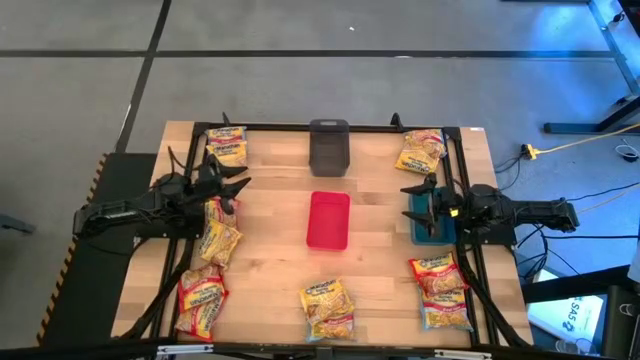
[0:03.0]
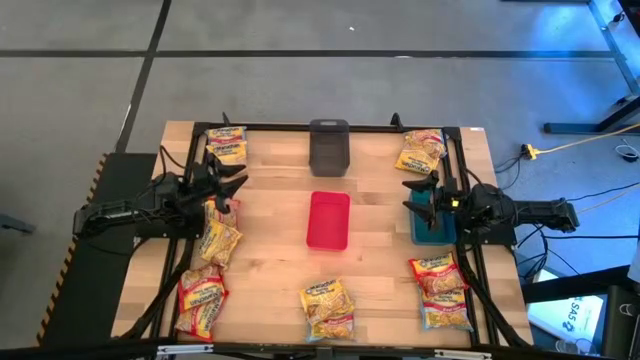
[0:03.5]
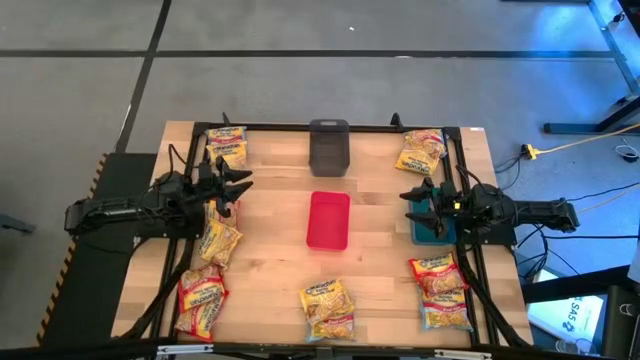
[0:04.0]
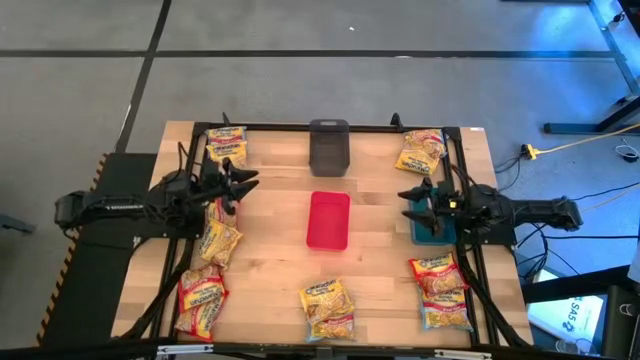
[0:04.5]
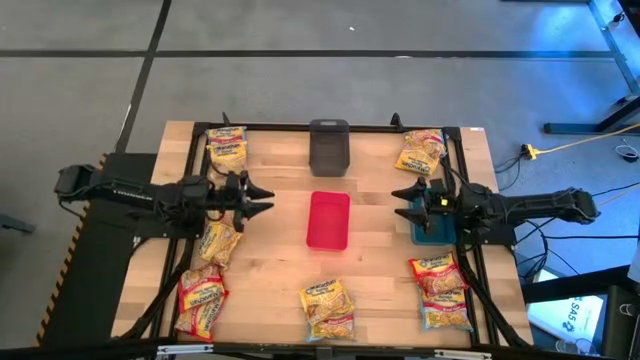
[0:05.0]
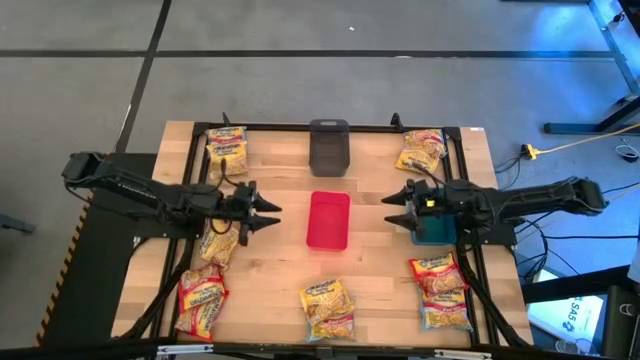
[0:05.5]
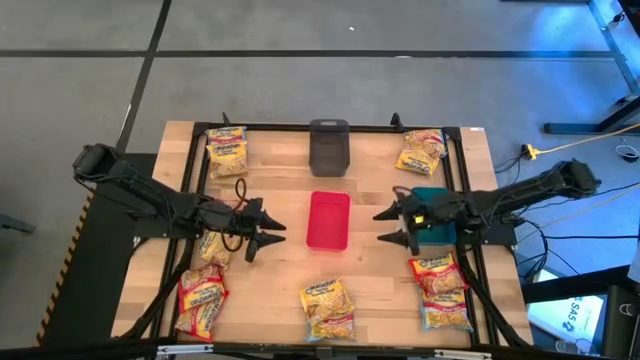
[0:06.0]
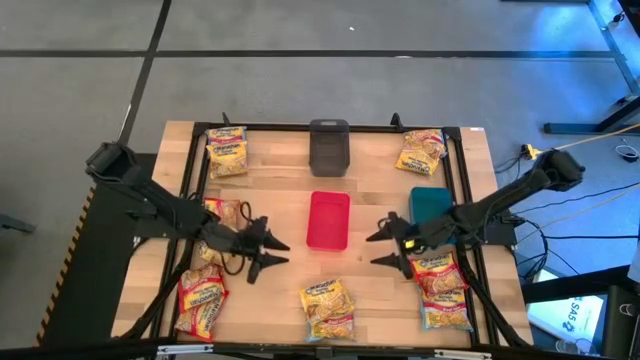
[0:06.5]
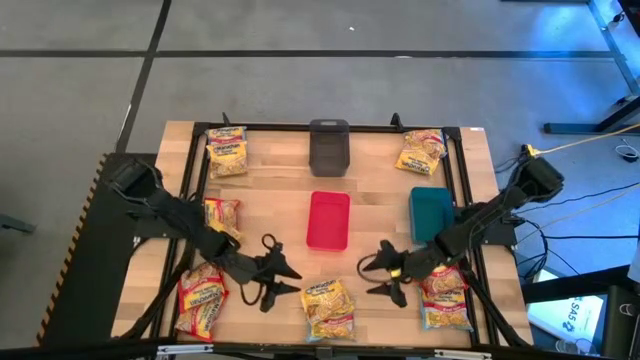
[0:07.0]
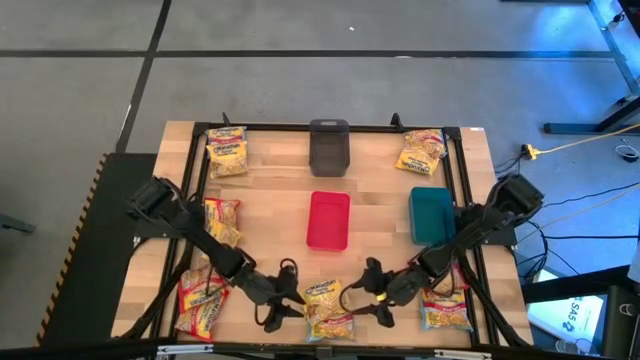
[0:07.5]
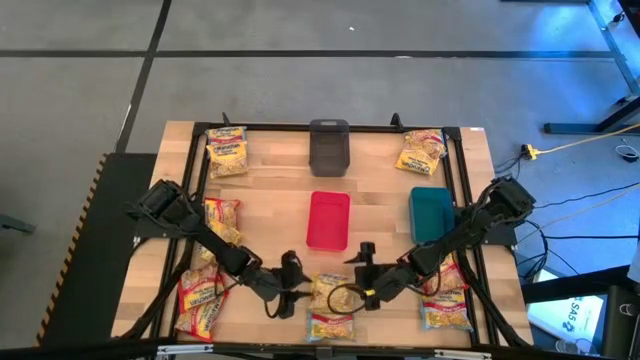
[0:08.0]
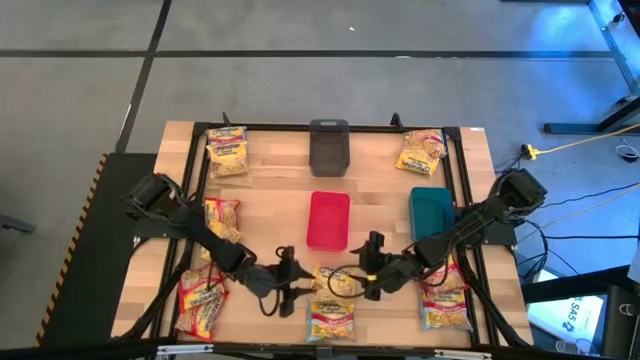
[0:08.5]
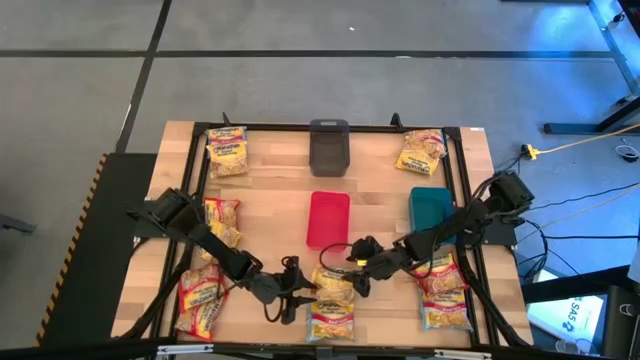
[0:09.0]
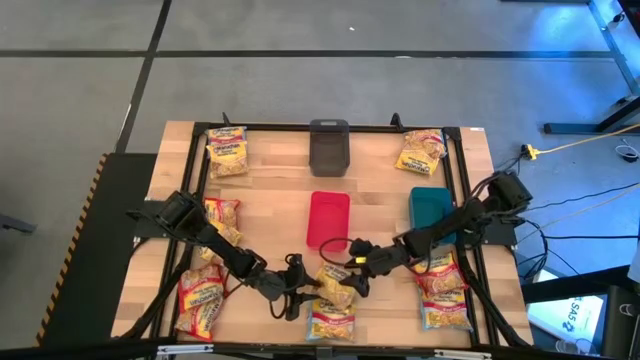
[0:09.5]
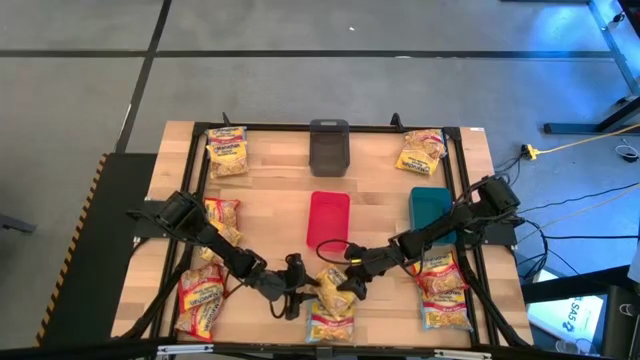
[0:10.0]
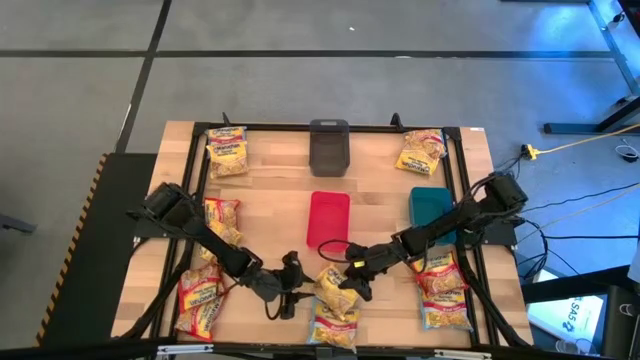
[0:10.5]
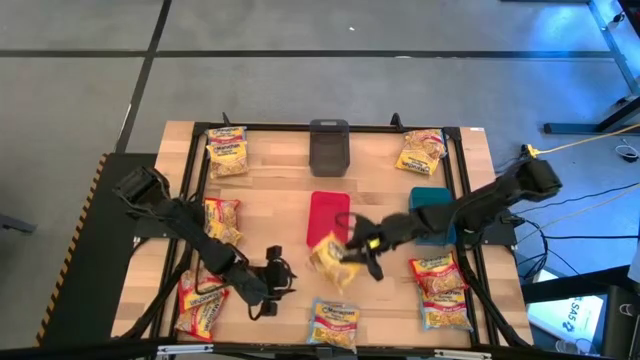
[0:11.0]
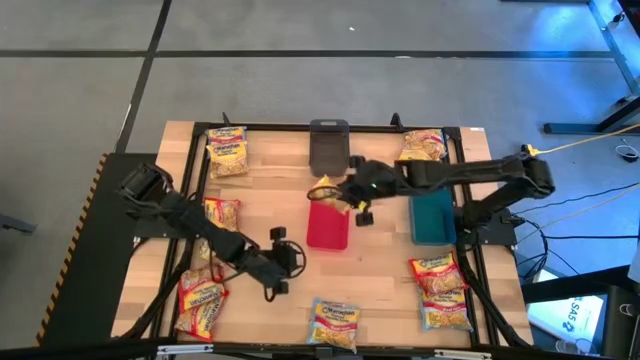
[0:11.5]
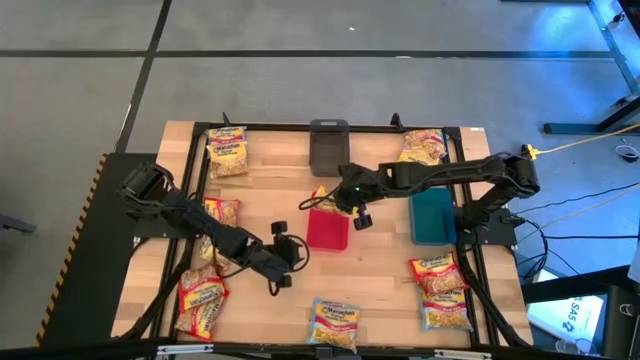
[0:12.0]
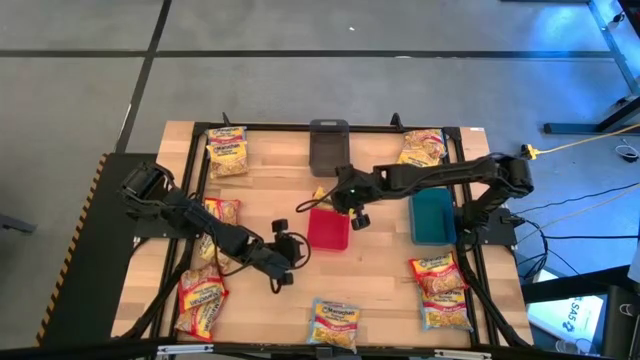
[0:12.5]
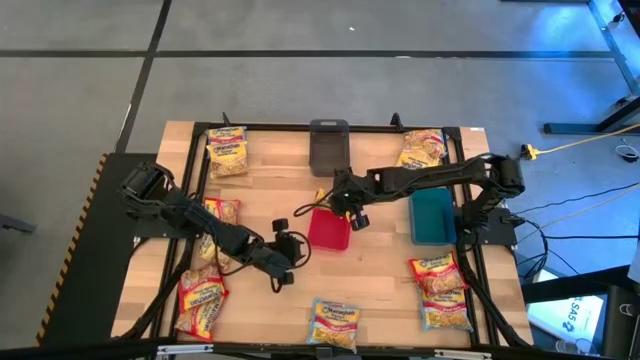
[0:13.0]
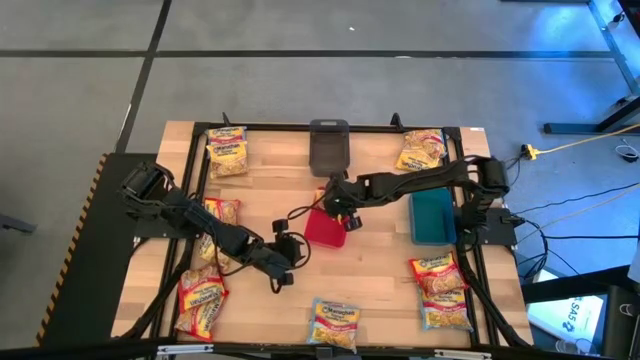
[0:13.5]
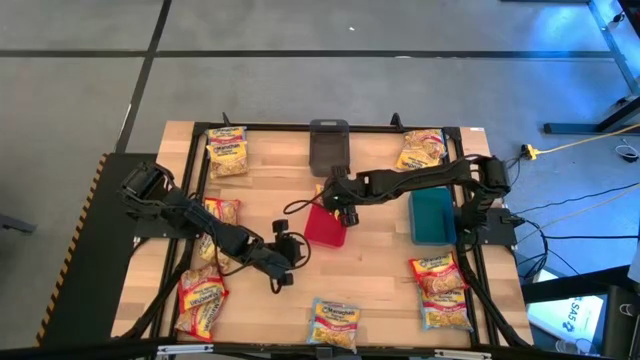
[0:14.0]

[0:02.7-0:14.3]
Task: Sort Maruchan noodles
Put the yellow noodle pack into the red bin

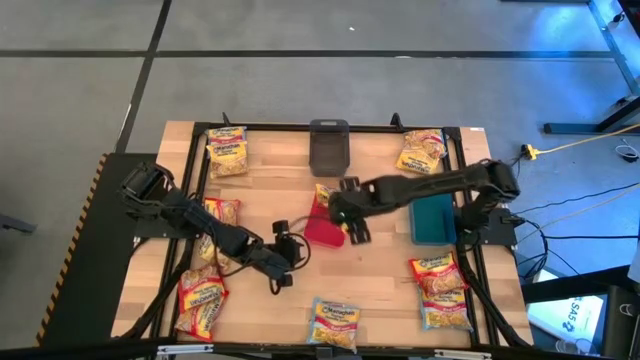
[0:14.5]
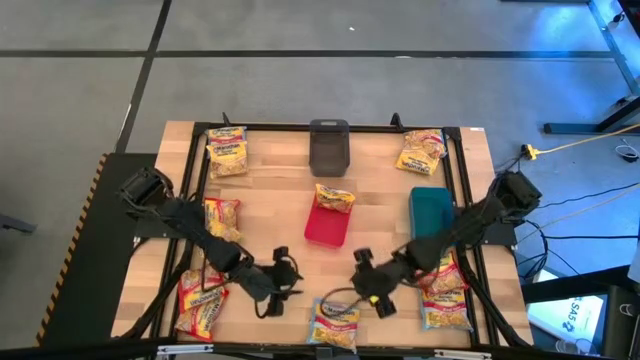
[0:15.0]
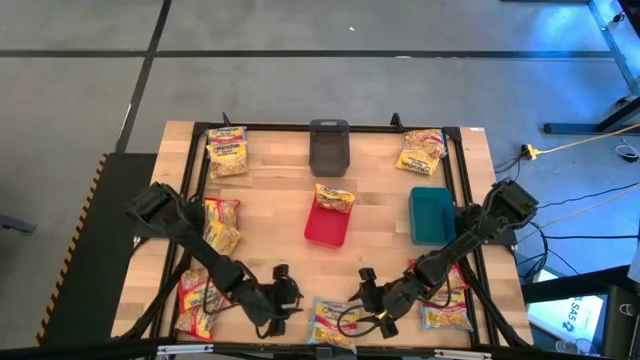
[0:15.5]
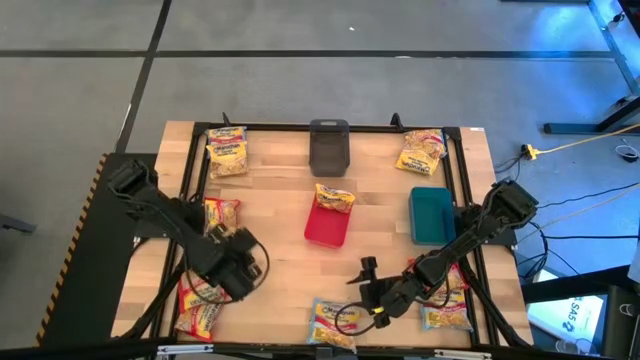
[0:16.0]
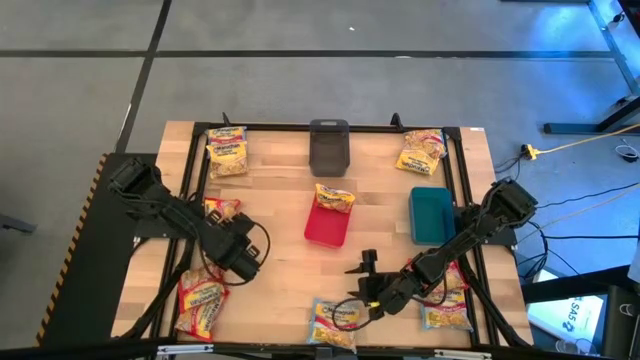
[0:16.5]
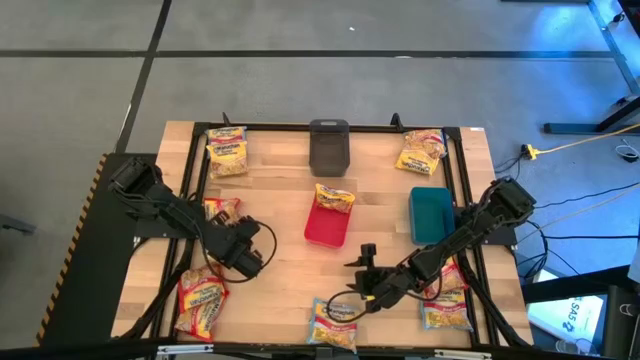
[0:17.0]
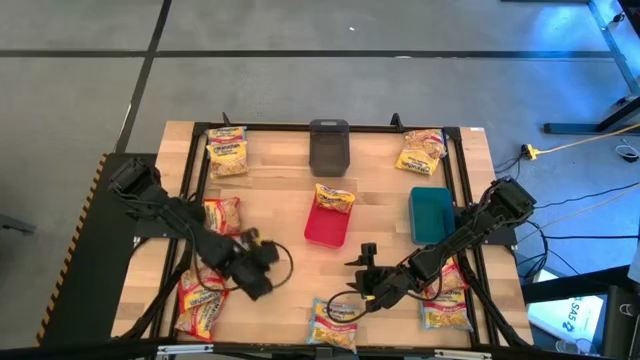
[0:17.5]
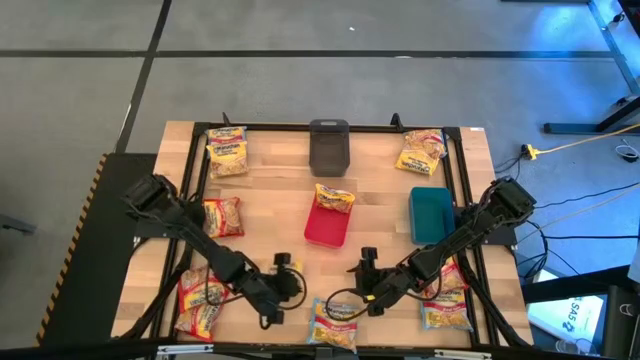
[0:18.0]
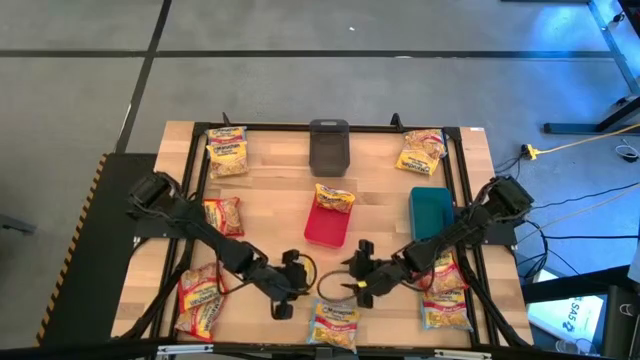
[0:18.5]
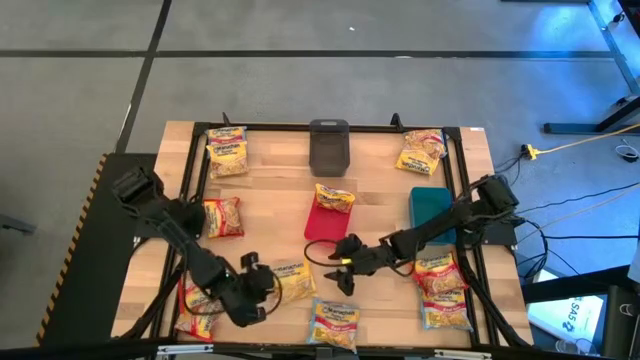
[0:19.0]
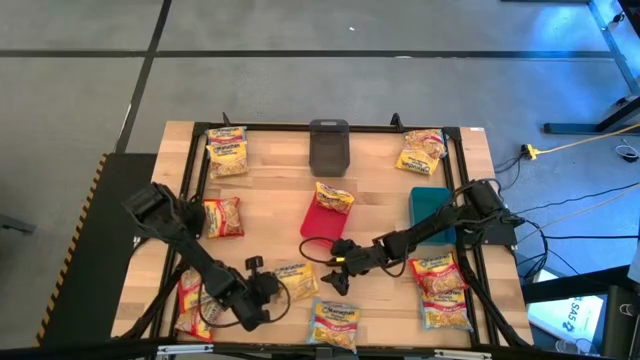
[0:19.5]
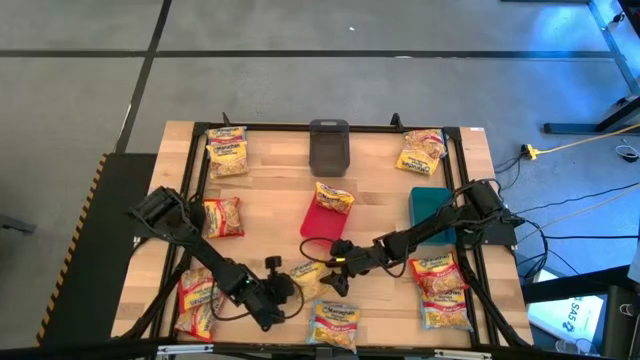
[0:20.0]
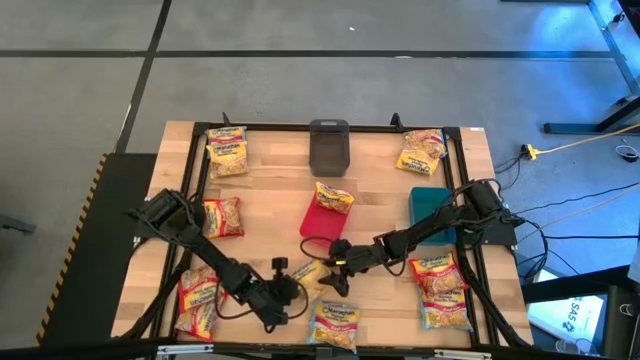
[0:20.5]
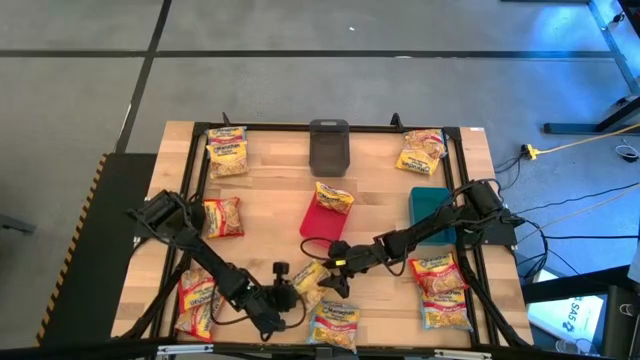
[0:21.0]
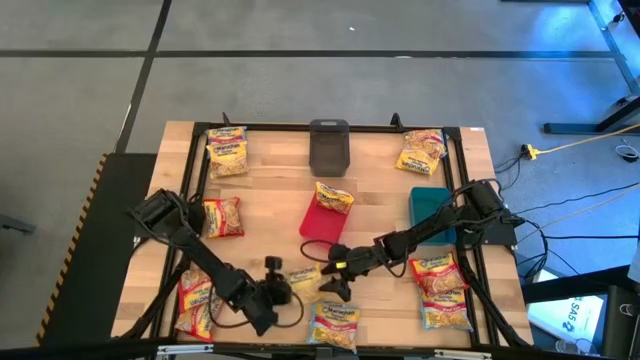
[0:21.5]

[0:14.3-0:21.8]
Put the yellow noodle pack into the red bin

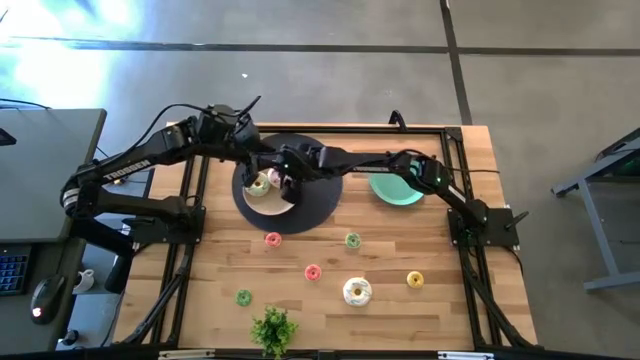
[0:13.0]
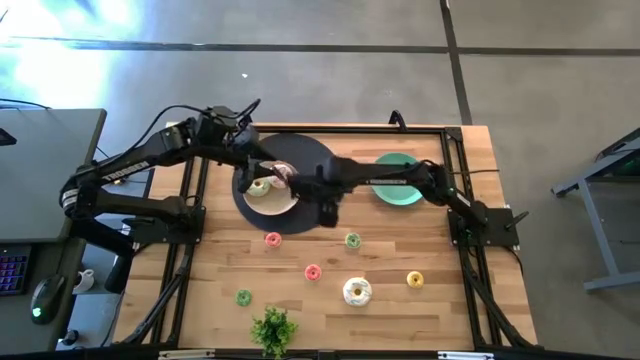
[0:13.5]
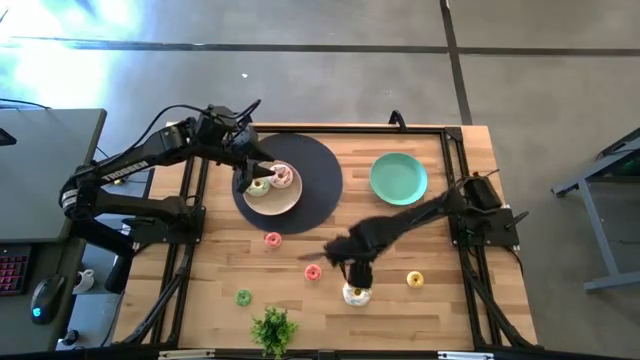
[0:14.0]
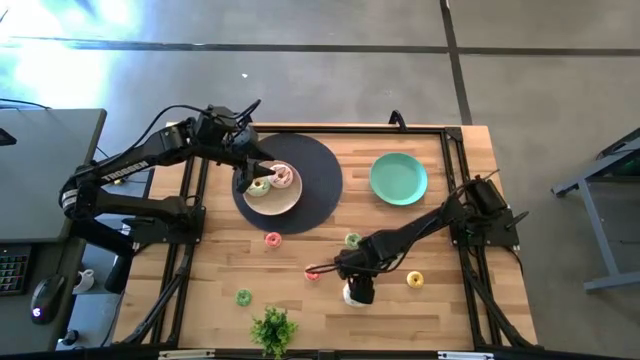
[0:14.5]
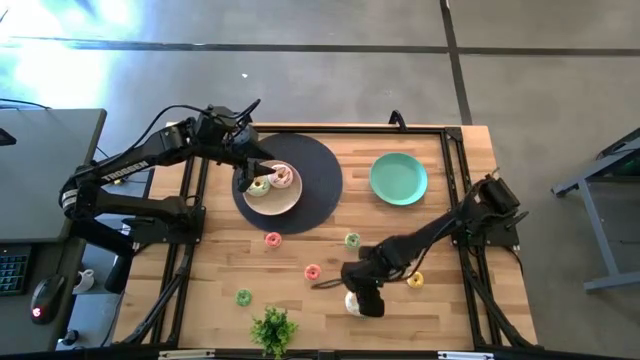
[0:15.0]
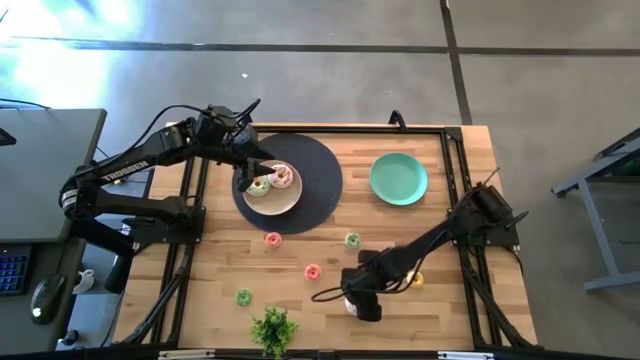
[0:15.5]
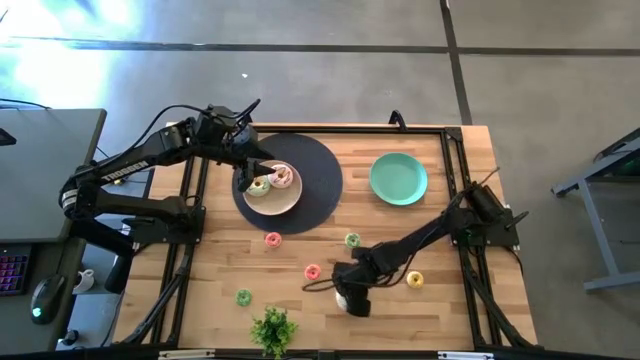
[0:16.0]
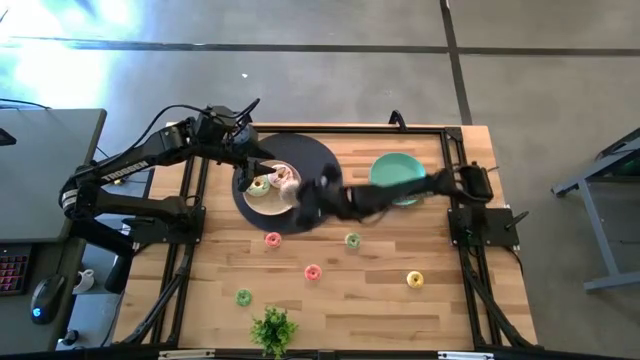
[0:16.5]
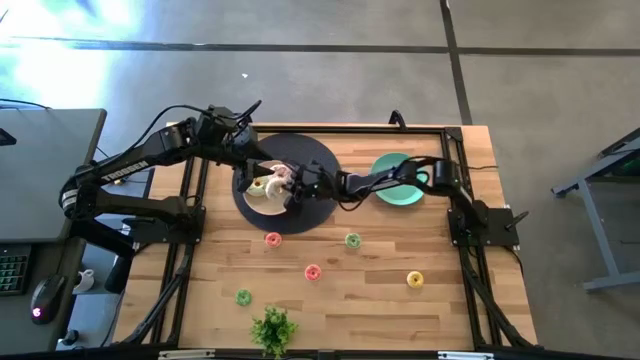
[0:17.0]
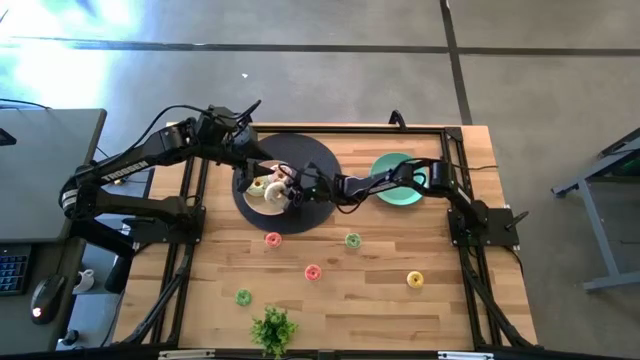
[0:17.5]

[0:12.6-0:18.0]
Task: Pick & Place donuts
Put the white donut on the white plate
